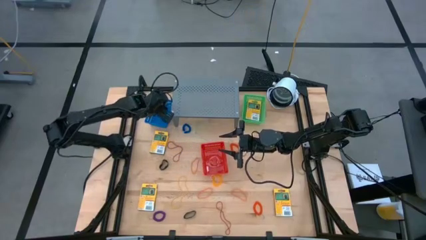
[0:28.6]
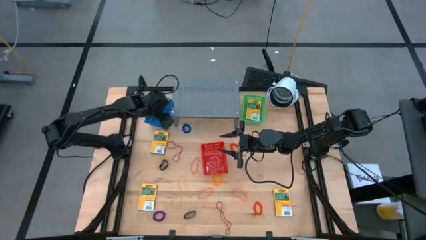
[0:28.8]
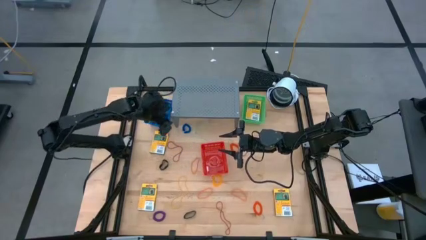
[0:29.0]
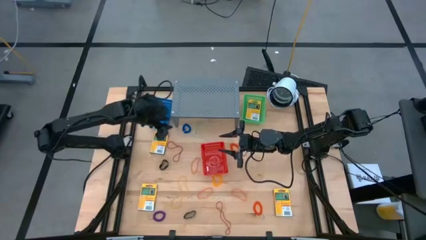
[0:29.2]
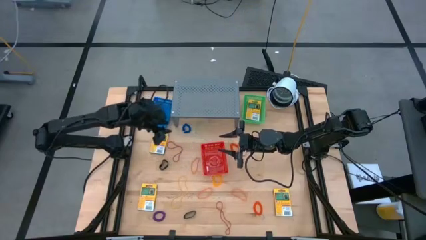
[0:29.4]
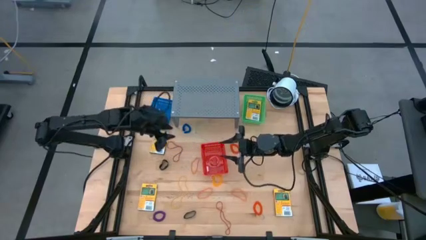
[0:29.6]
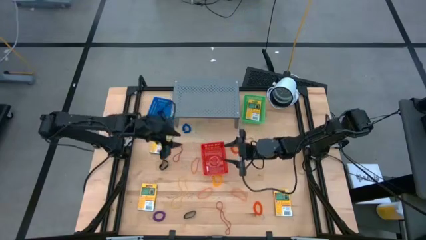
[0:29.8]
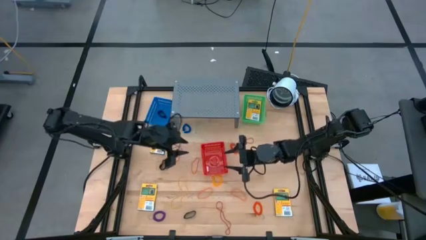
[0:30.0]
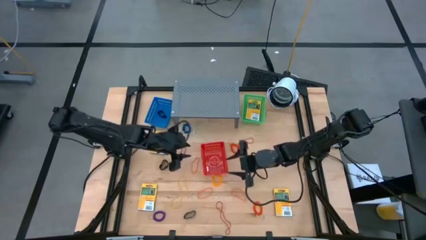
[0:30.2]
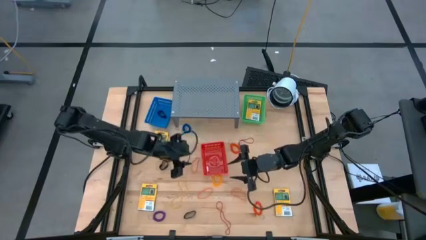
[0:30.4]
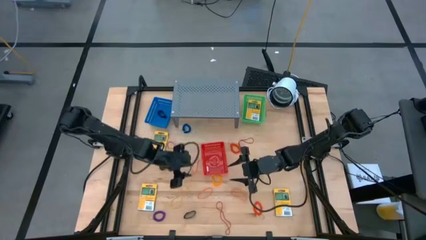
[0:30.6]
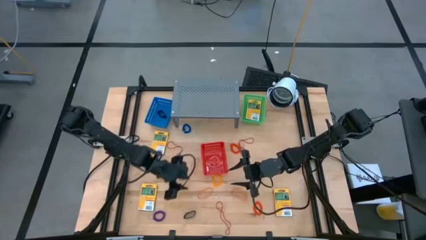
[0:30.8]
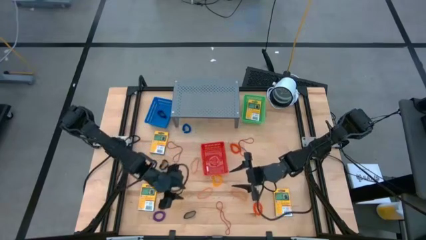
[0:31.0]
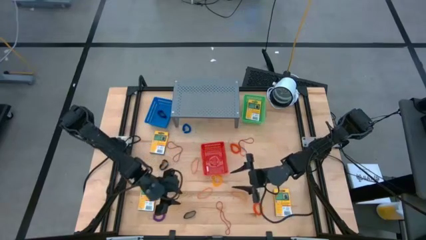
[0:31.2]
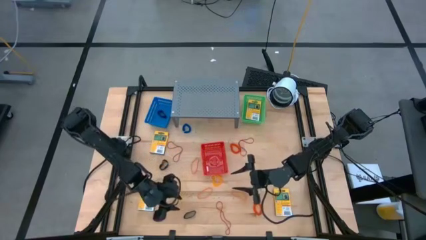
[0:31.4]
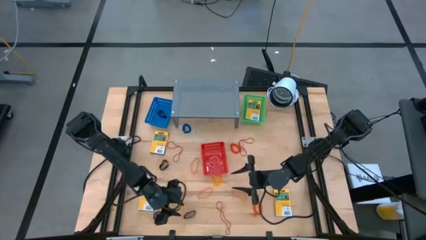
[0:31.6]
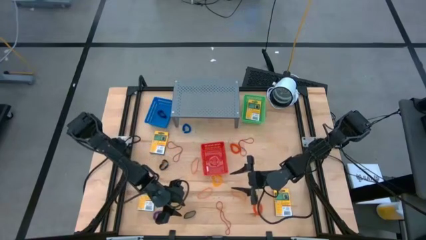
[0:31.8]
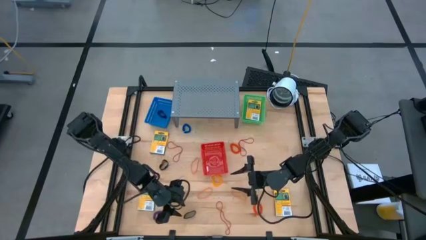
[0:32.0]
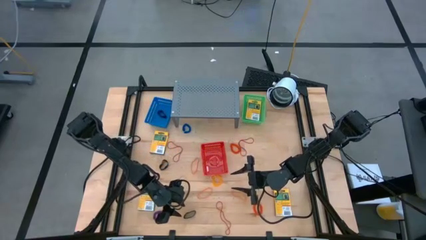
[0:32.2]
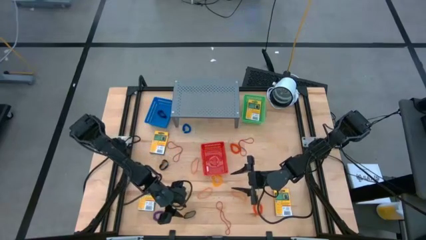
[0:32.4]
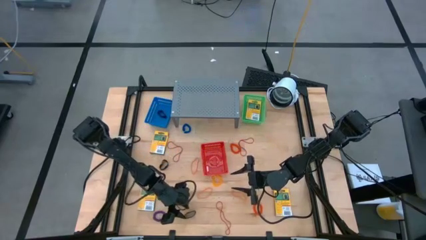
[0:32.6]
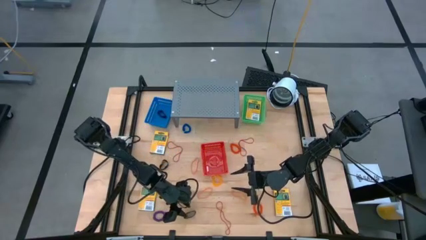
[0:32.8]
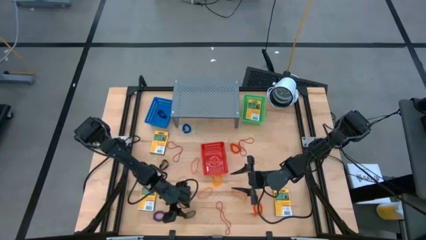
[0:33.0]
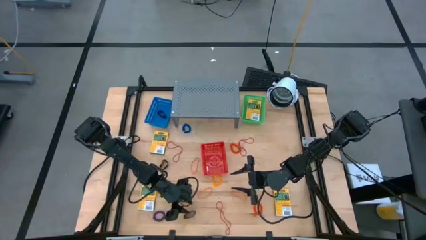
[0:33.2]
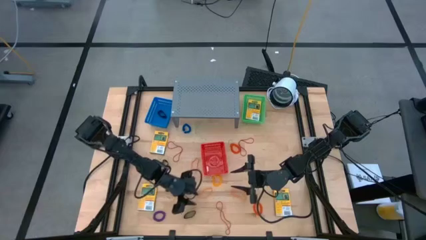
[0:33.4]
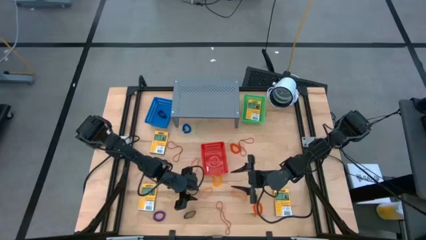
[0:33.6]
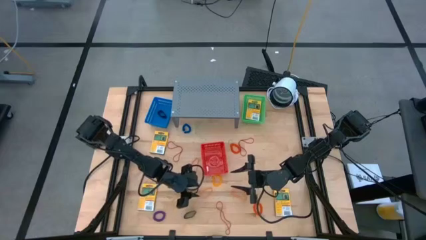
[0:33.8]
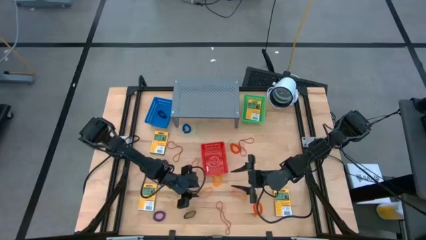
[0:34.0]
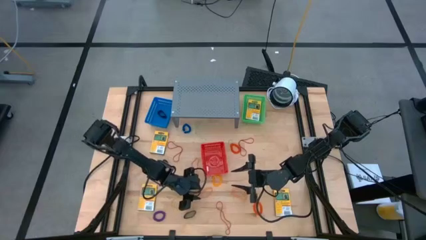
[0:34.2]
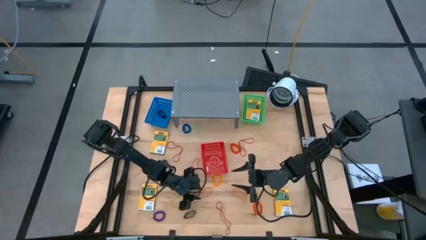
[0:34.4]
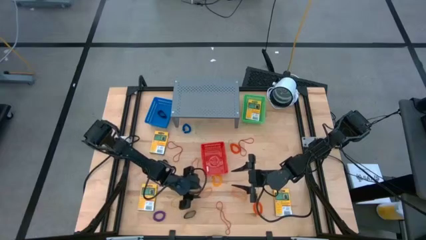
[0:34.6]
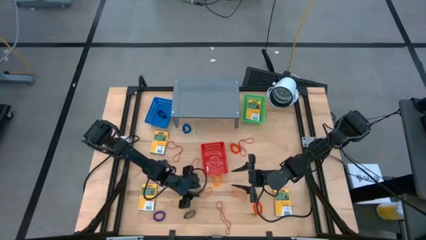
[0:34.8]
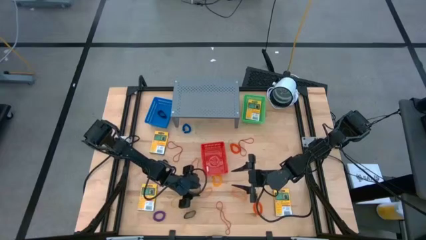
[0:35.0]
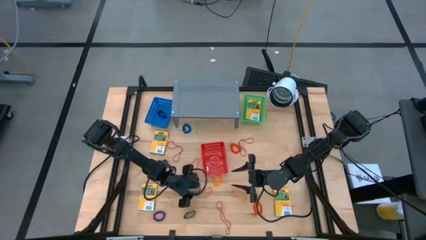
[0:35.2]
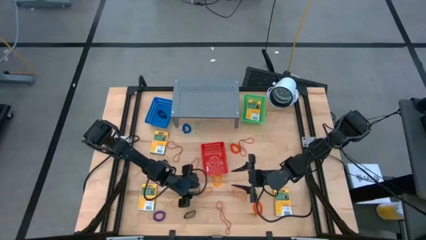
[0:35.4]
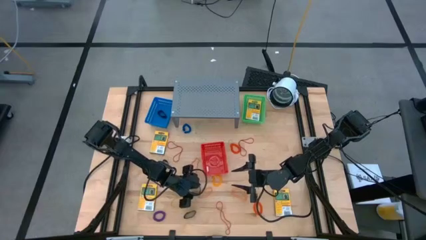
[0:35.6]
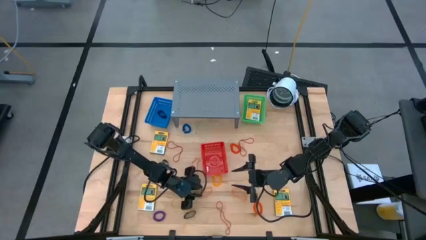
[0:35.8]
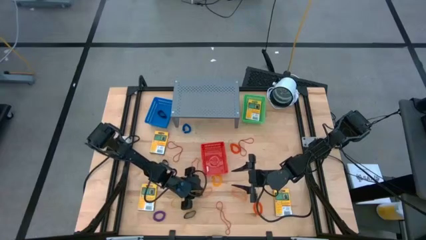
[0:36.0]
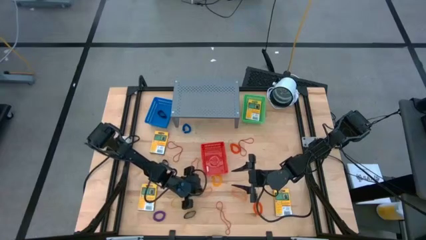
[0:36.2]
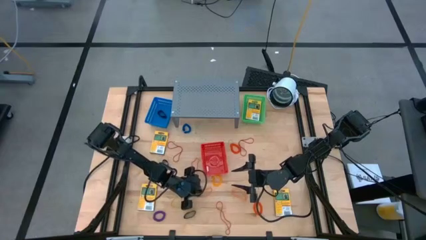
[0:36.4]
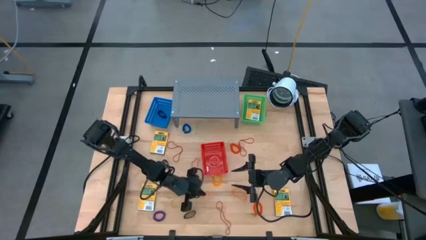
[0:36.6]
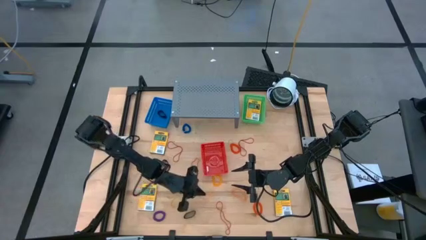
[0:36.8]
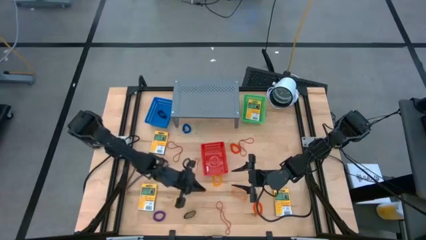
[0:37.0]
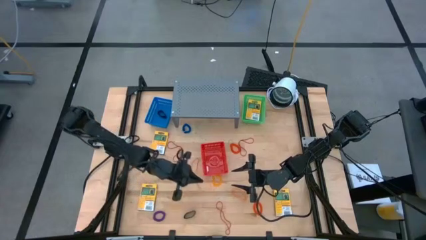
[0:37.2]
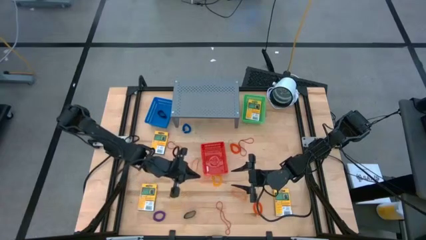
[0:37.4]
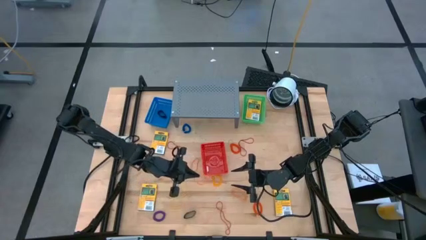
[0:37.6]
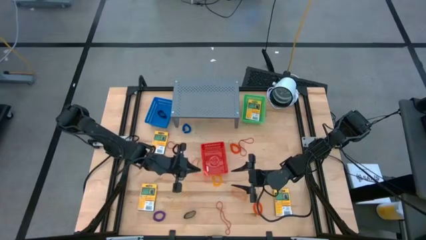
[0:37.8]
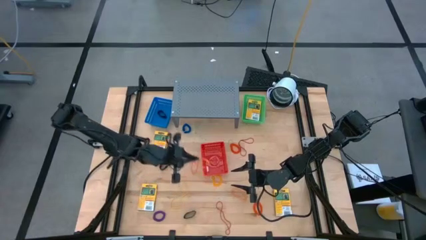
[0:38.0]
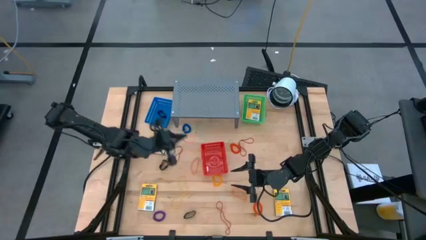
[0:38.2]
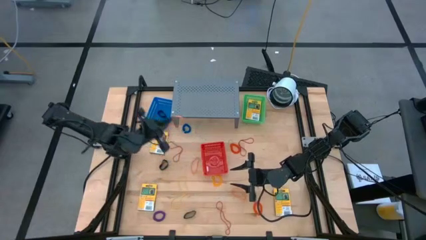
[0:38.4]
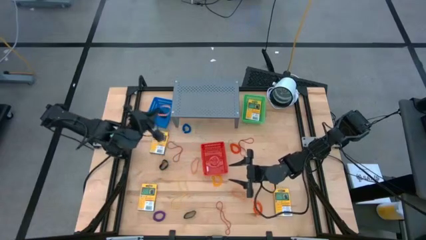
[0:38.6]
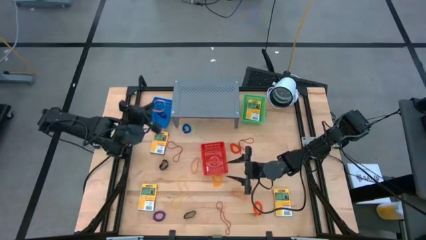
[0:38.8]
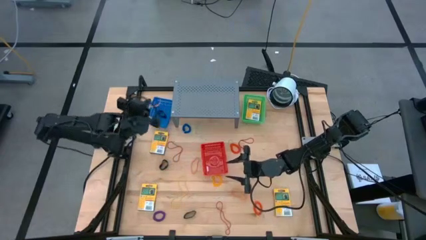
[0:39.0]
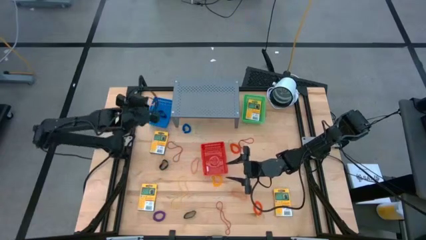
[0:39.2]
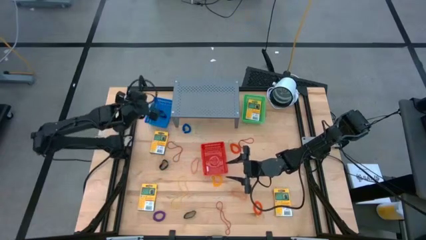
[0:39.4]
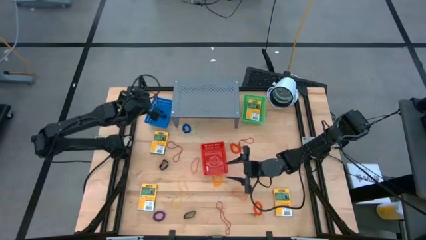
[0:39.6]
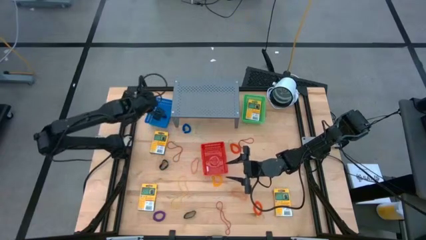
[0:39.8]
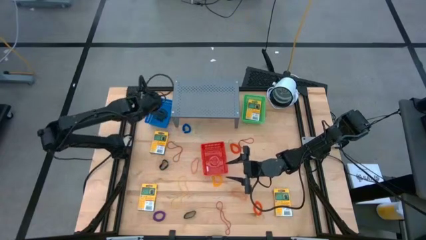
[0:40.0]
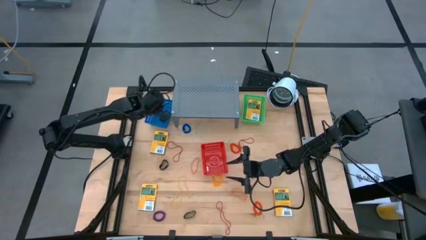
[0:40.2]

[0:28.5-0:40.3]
Task: Pick & Place Office Desk Supplies
Put the bottom left orange rubber band into the blue basket
